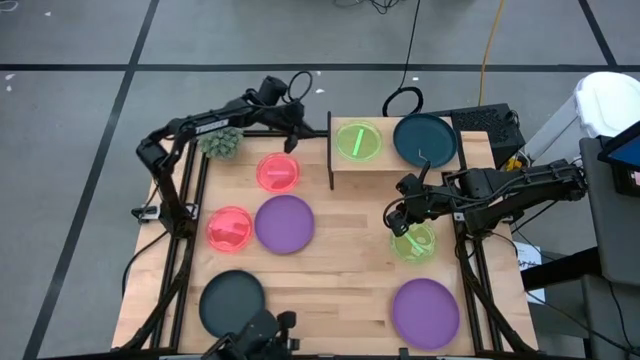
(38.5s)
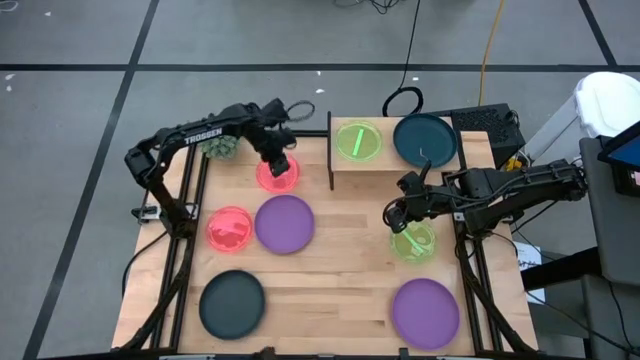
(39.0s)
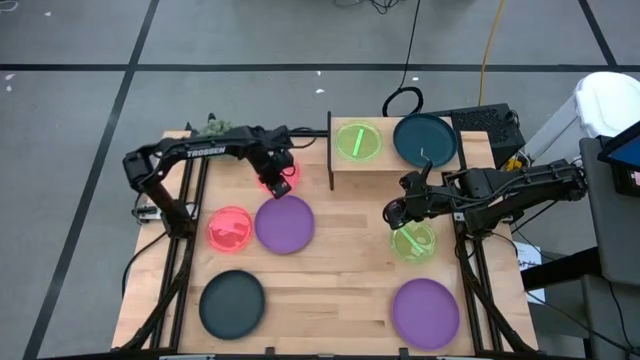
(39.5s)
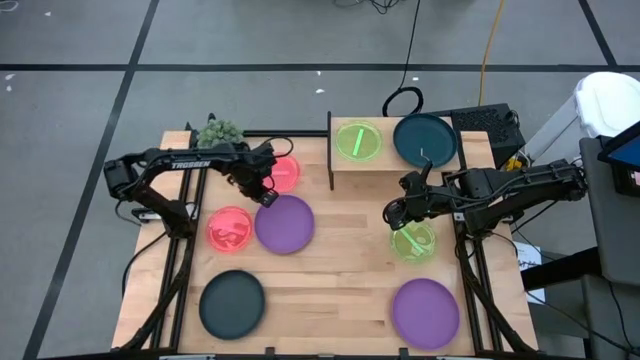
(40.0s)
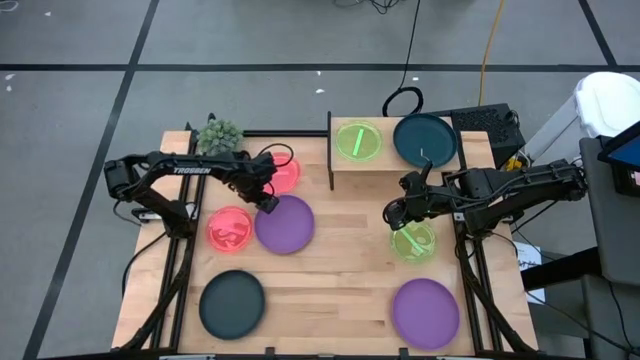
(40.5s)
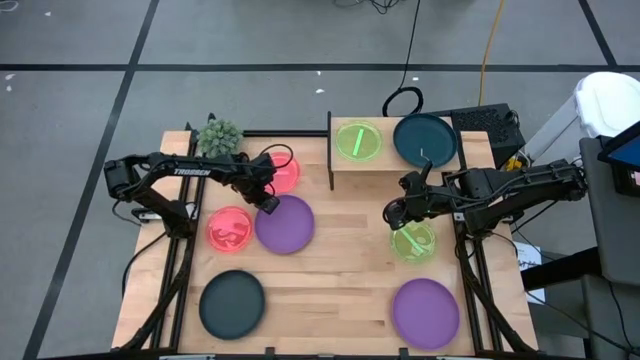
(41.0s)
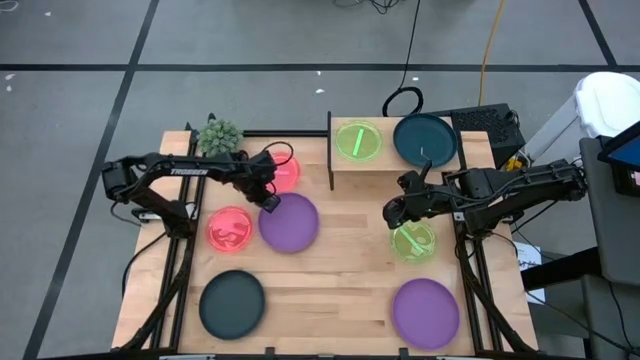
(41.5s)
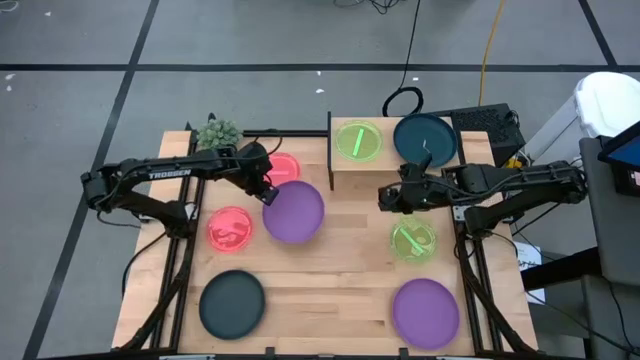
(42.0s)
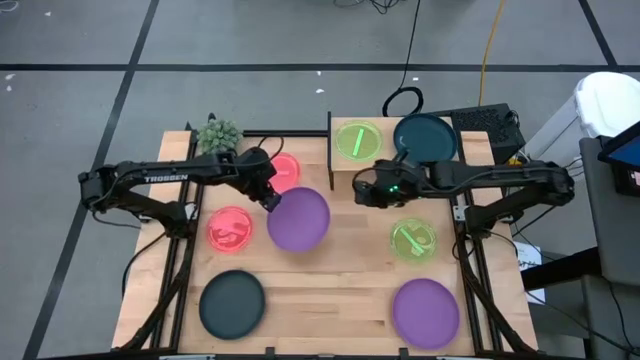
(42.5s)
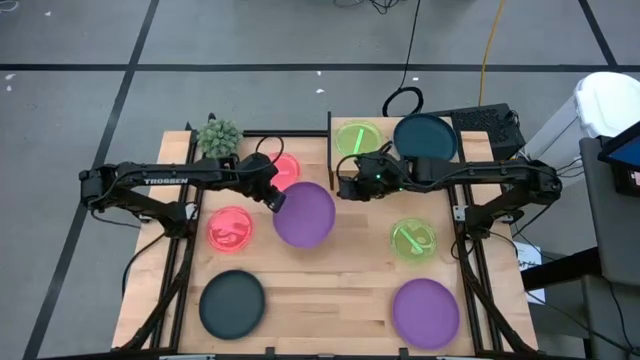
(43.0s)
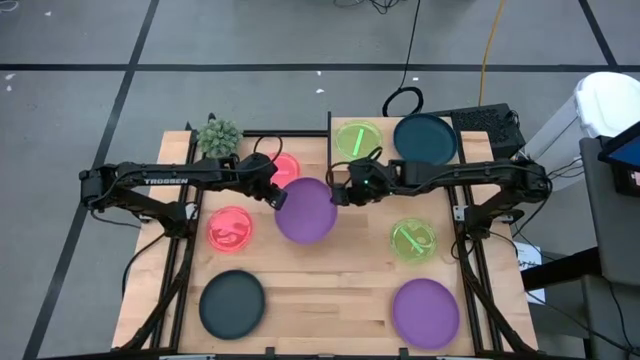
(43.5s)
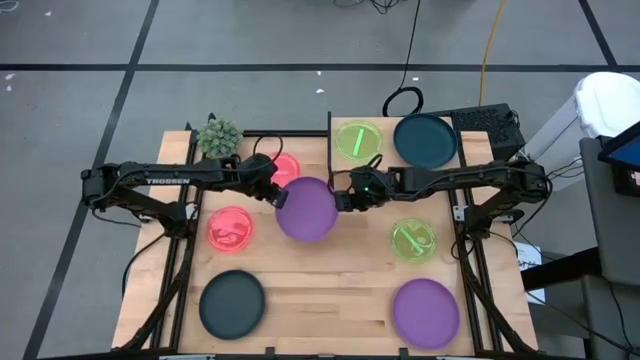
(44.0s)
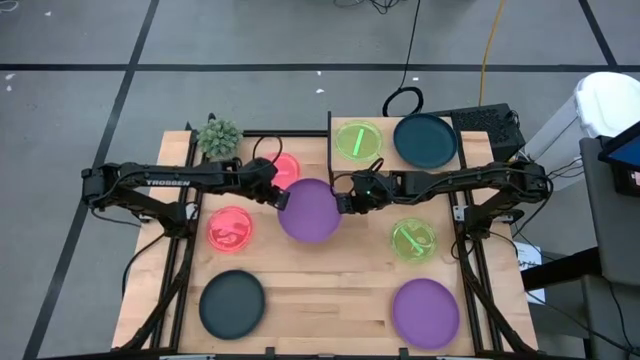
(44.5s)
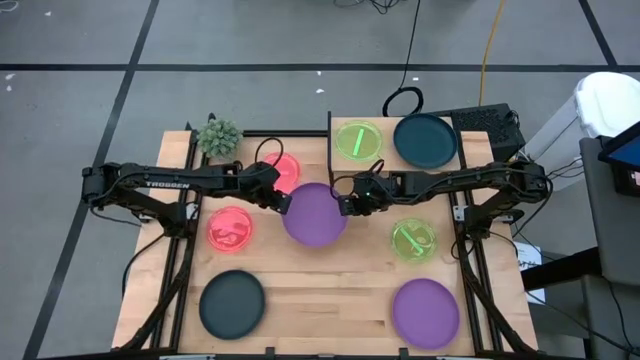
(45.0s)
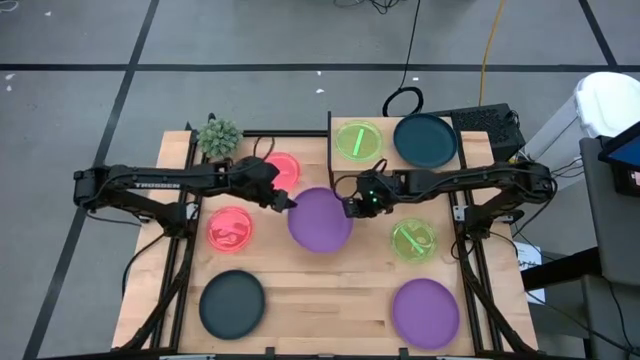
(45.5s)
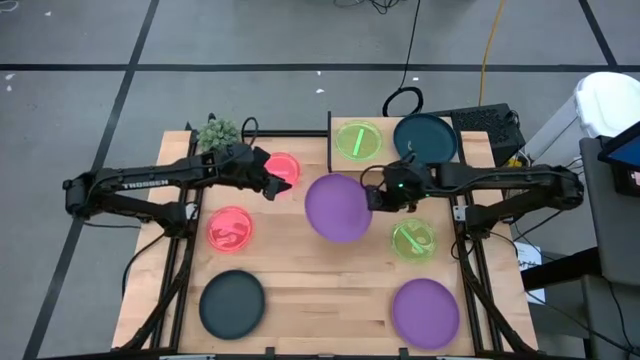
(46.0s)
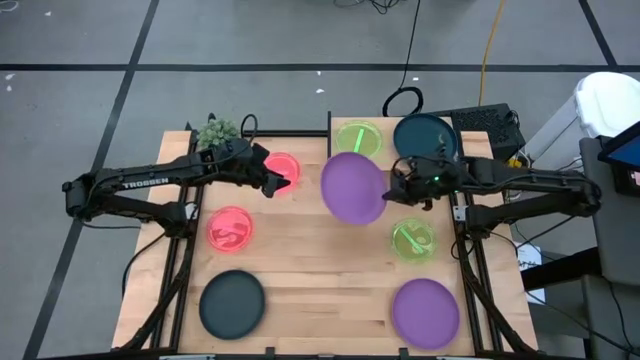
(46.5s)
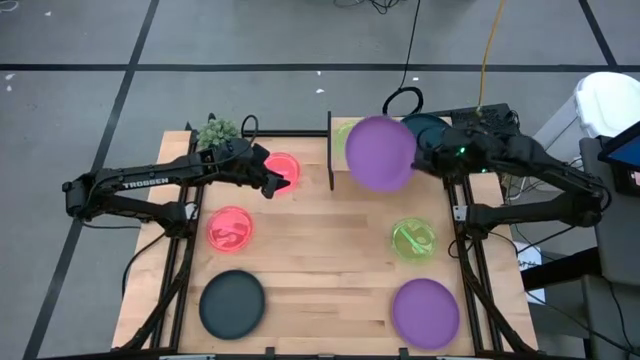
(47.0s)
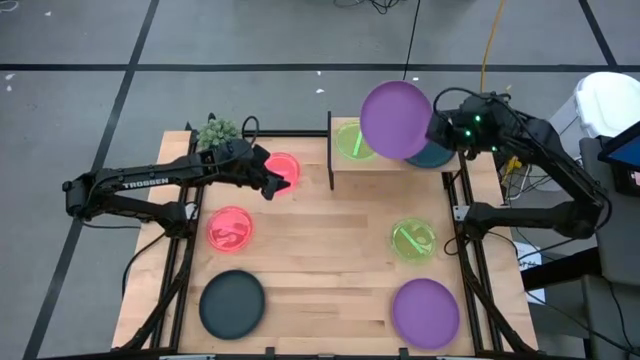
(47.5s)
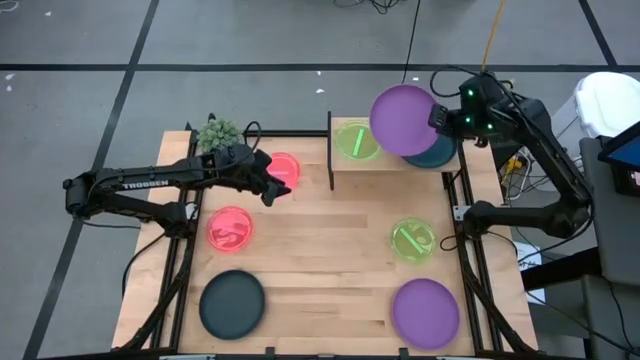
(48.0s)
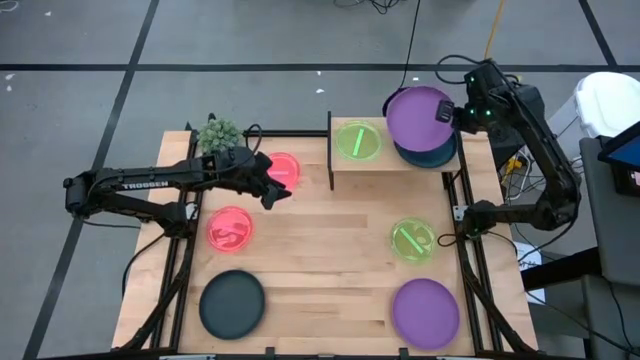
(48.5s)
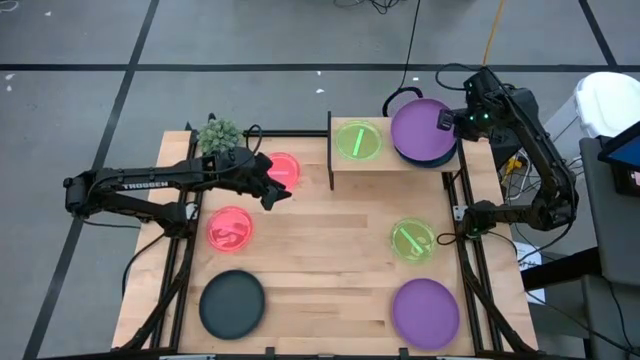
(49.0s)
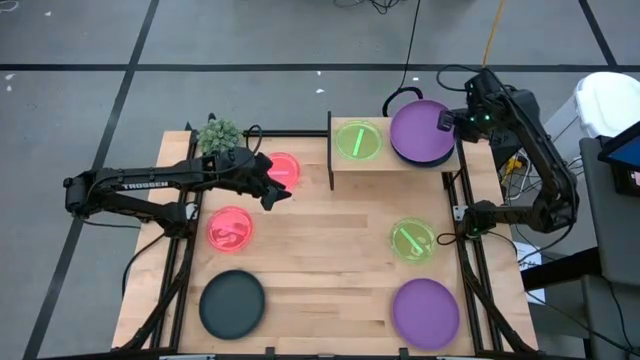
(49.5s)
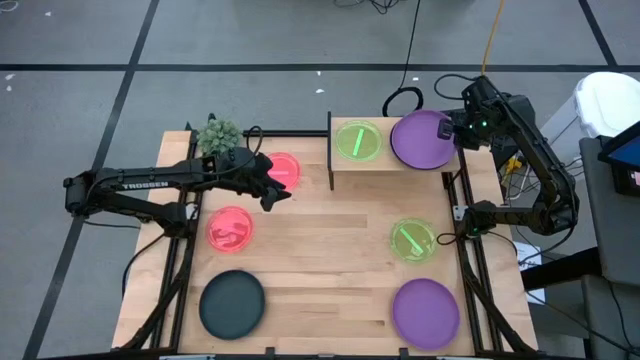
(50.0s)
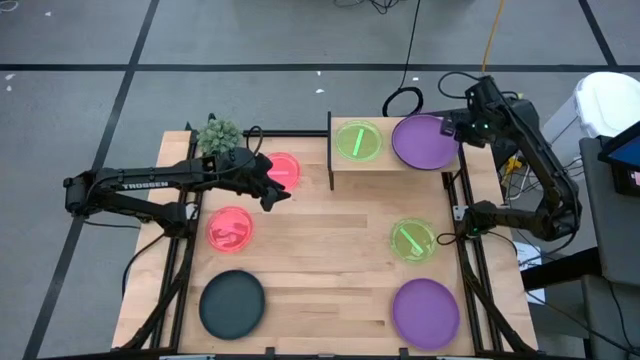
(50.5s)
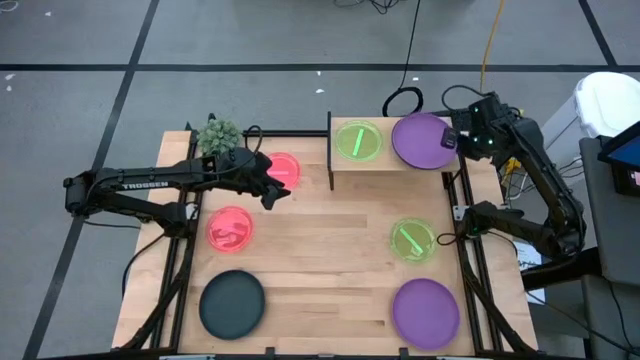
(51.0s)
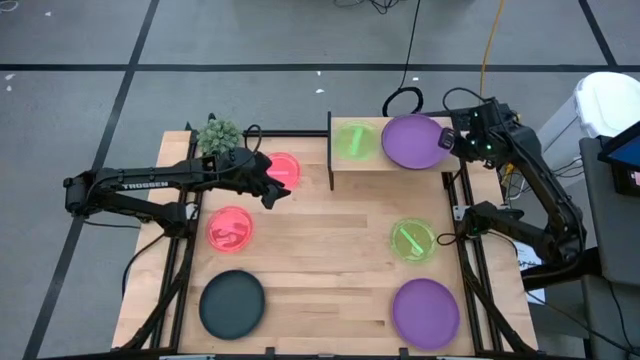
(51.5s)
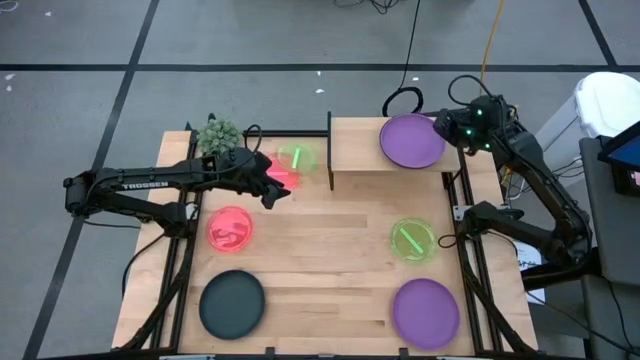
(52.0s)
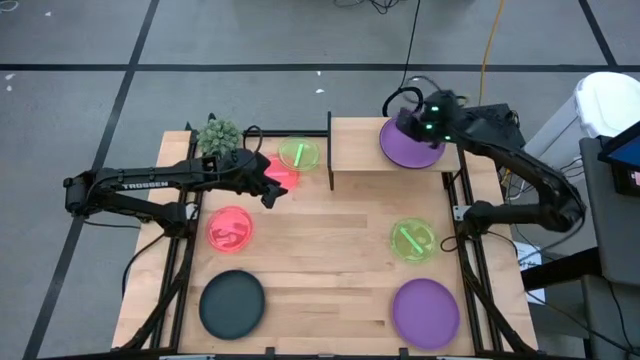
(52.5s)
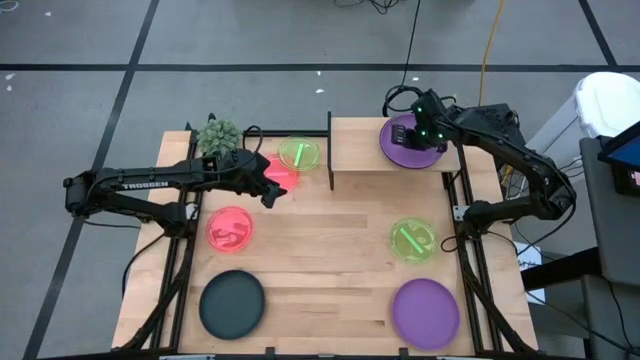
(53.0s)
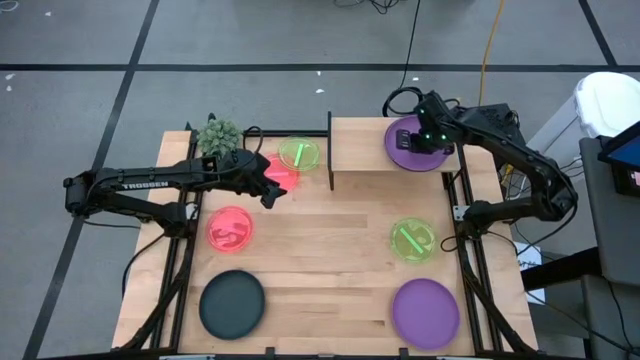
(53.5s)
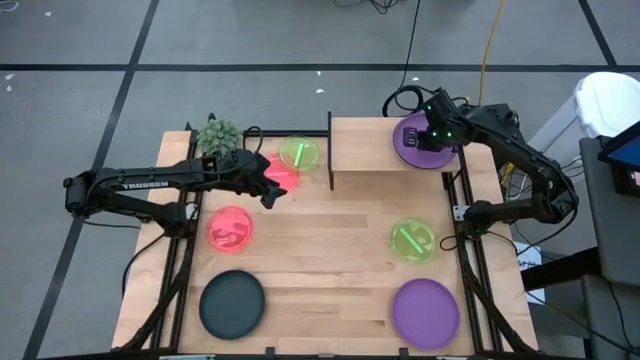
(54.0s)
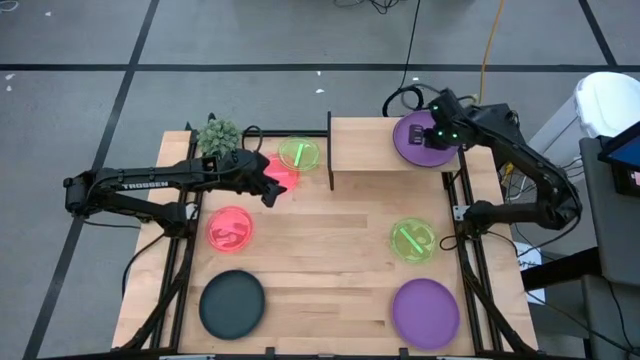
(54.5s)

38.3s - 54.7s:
Task: Place and stack plates onto a shelf
Stack the left violet plate on the black plate on the shelf

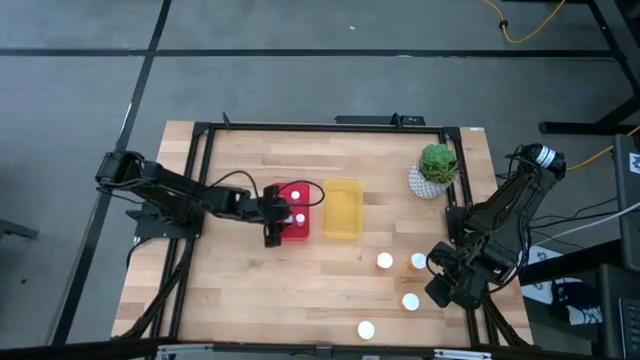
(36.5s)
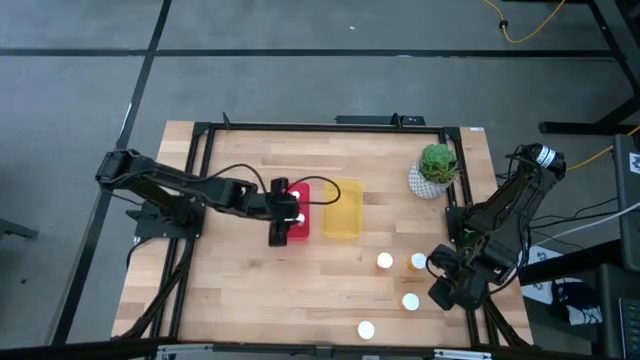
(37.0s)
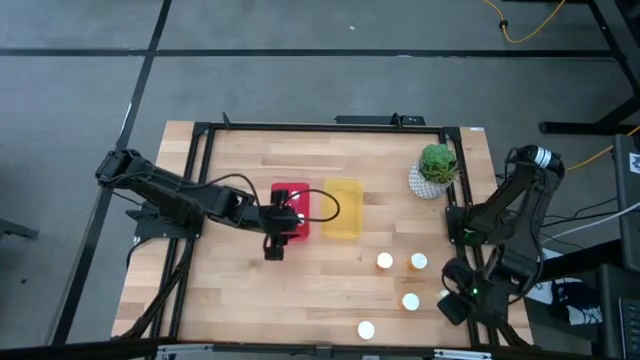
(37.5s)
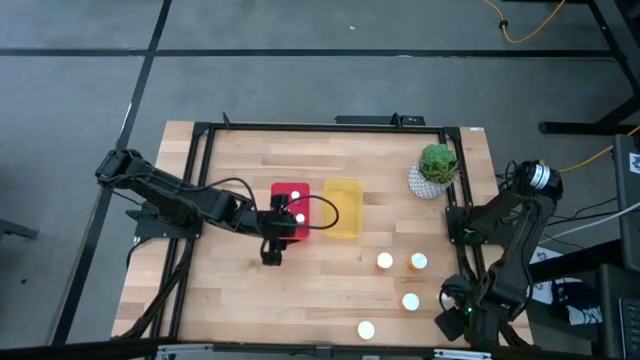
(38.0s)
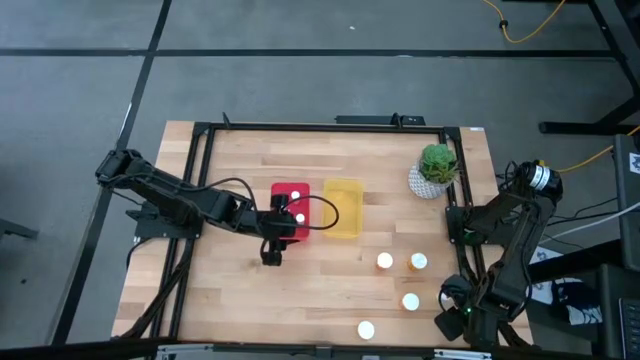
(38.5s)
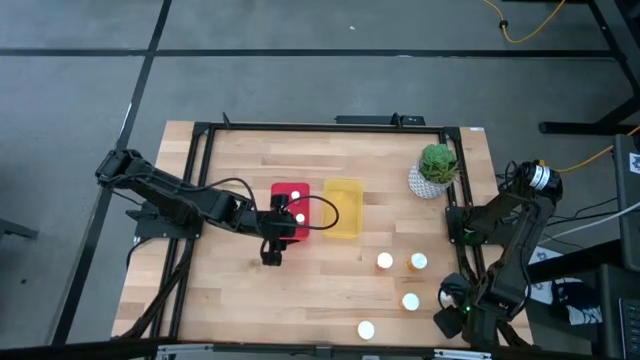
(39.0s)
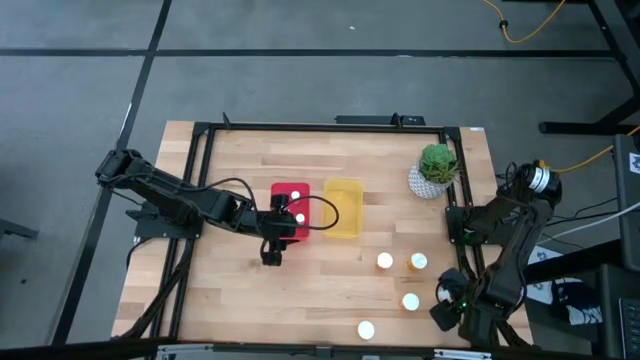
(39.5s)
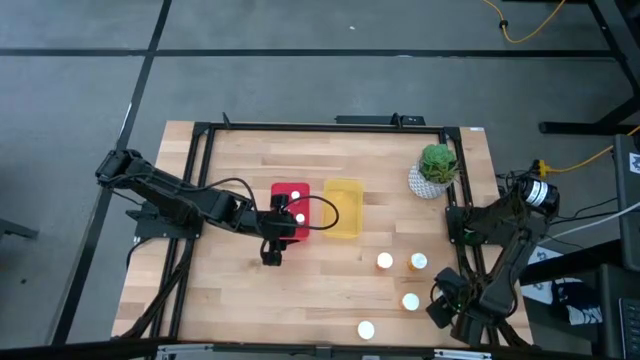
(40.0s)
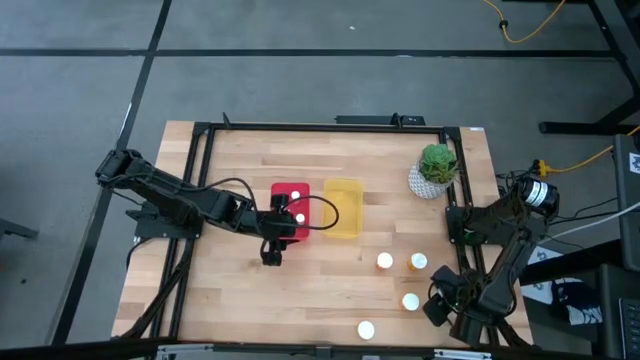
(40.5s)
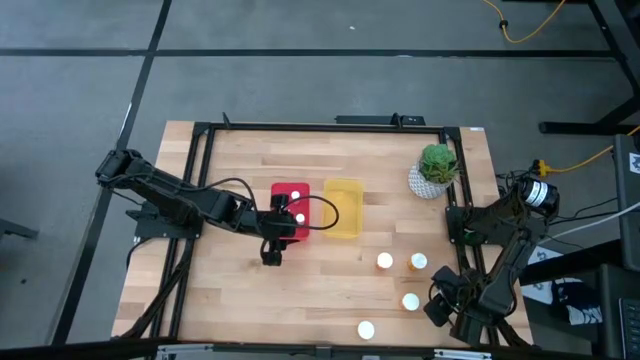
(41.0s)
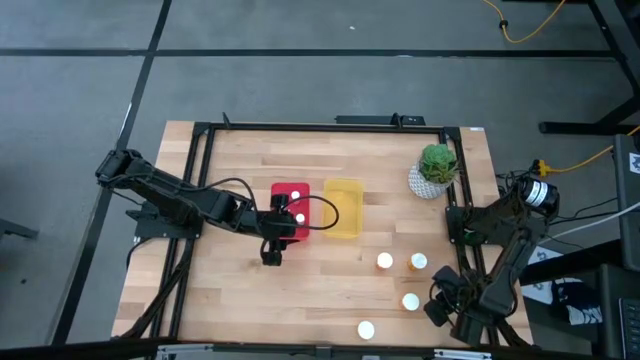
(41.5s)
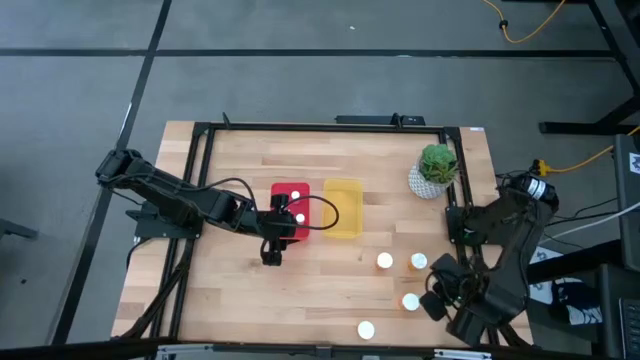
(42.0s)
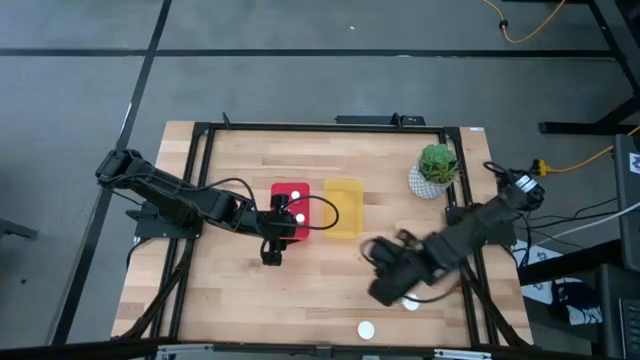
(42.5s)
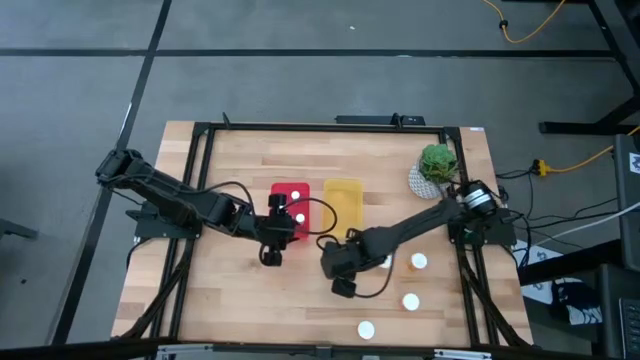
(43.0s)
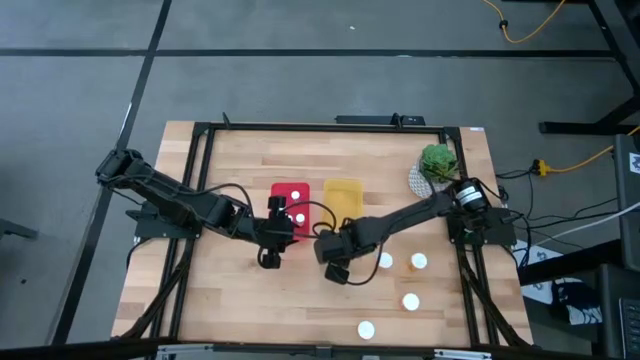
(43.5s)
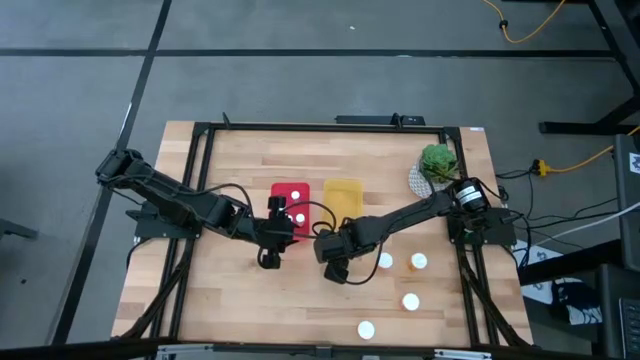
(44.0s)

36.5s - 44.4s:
Task: Pick and place medicine bottles into bin by pill shape (circle, oval)
Move the small yellow pill bottle to the center of the table
